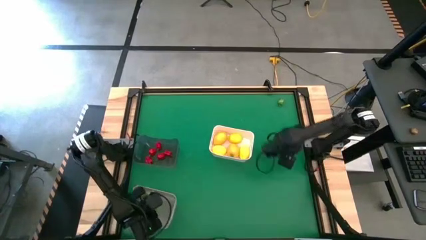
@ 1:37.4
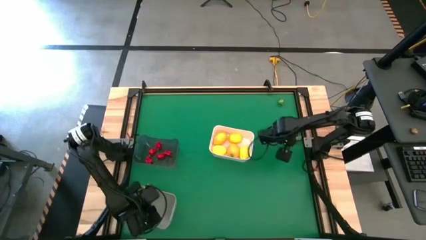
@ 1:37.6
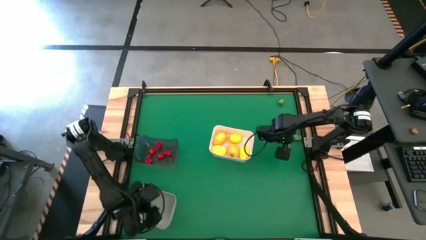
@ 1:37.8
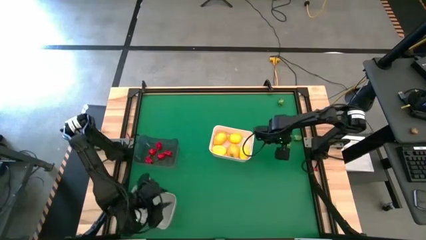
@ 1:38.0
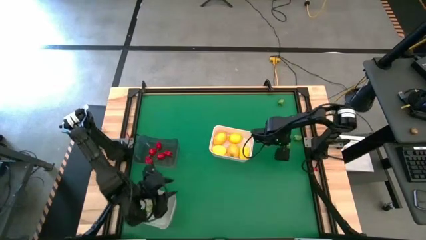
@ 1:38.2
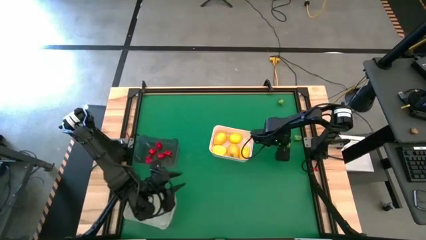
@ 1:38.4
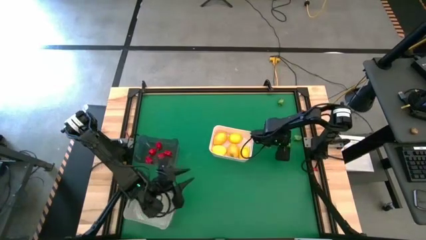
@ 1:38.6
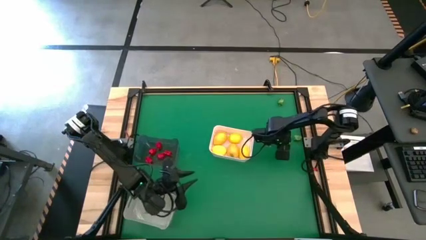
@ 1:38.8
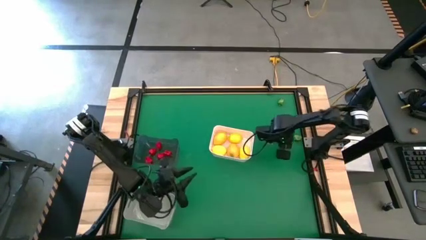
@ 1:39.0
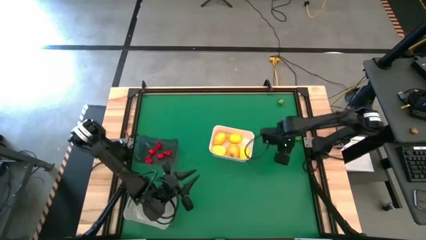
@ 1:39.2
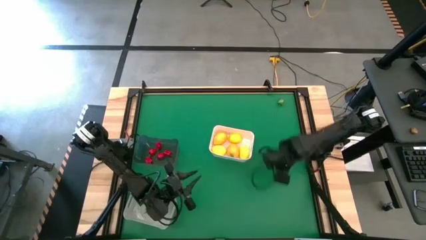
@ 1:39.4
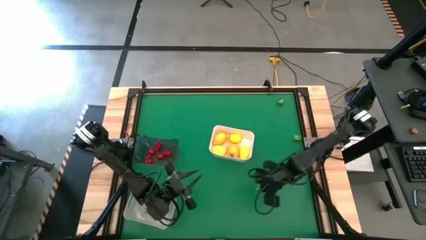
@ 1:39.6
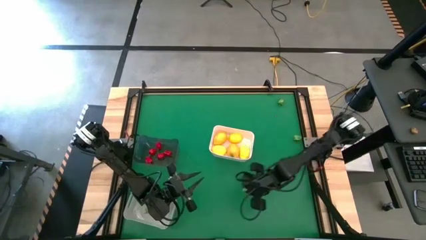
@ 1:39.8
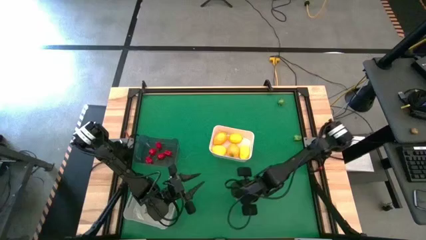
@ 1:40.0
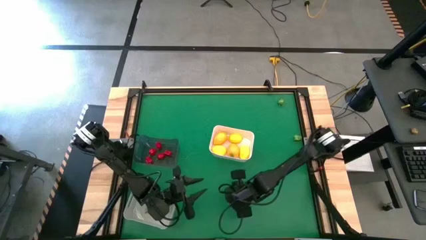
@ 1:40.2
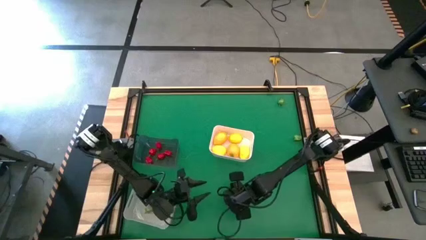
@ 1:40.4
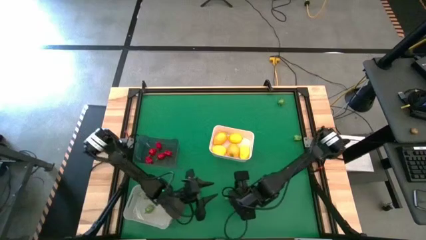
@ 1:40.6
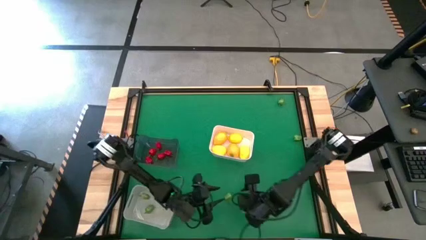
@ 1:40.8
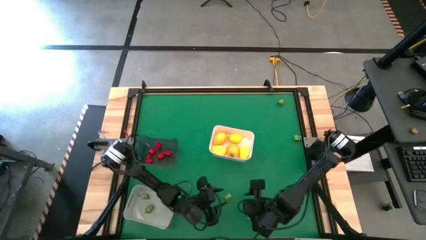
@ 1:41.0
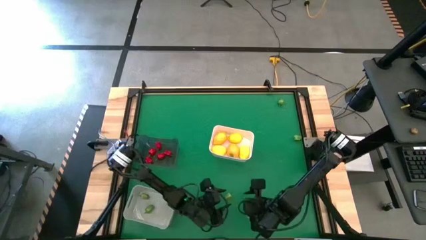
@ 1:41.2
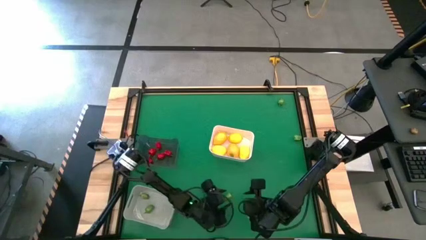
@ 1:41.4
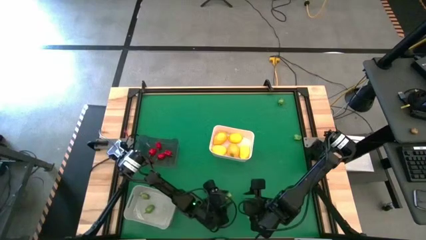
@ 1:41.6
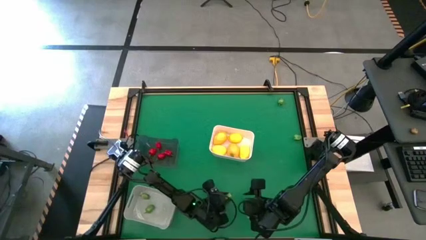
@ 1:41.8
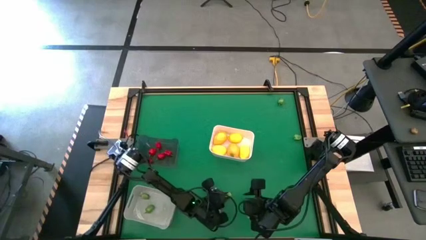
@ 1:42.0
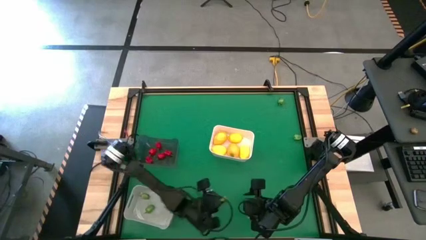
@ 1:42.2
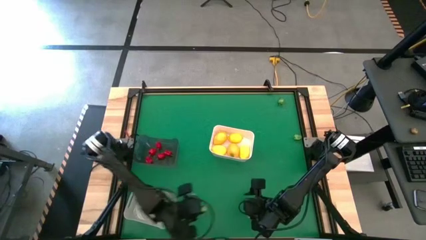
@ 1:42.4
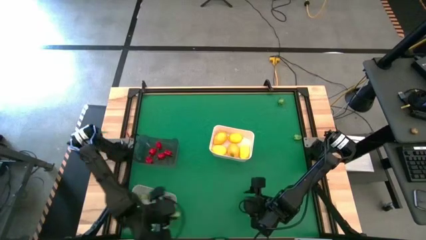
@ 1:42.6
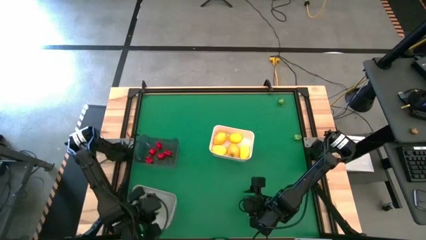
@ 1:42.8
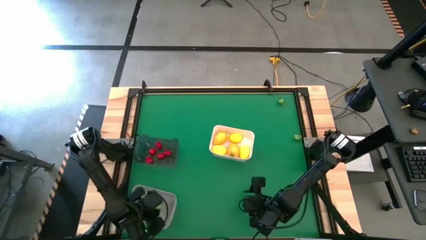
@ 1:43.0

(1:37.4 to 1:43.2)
Task: Sort produce into baskets
Put the green chili pepper into the gray bin

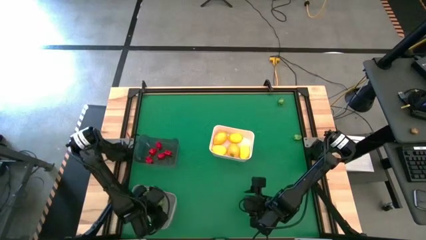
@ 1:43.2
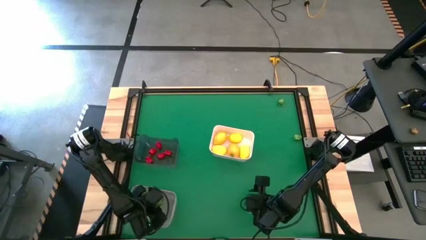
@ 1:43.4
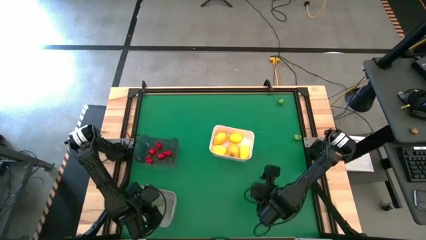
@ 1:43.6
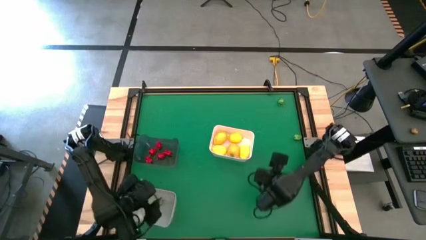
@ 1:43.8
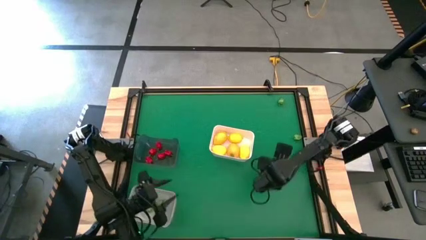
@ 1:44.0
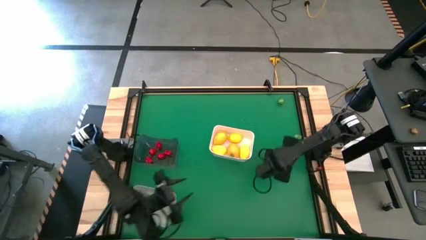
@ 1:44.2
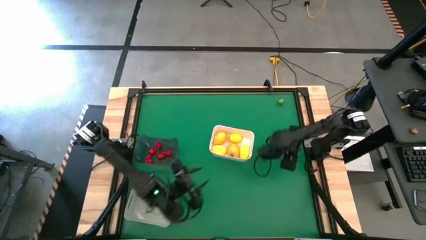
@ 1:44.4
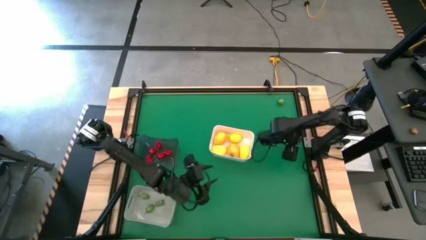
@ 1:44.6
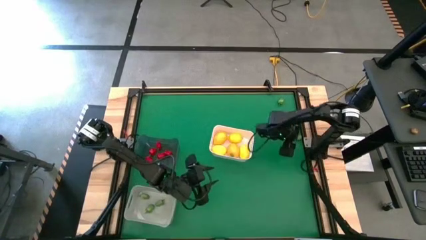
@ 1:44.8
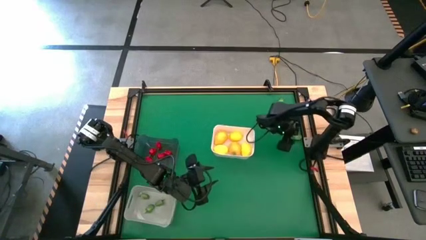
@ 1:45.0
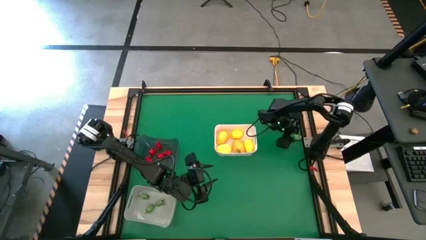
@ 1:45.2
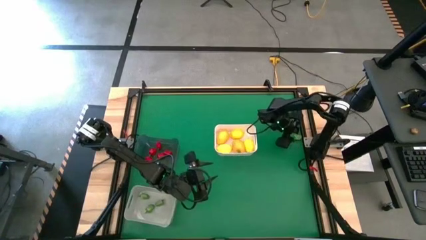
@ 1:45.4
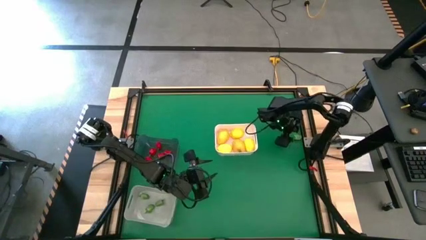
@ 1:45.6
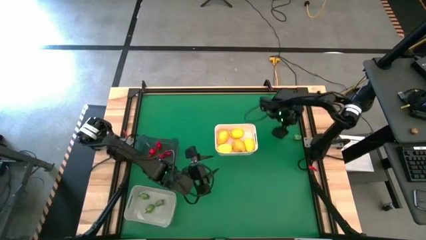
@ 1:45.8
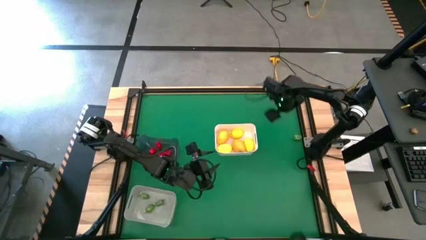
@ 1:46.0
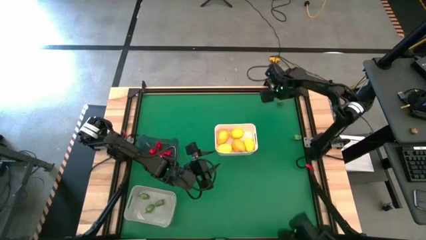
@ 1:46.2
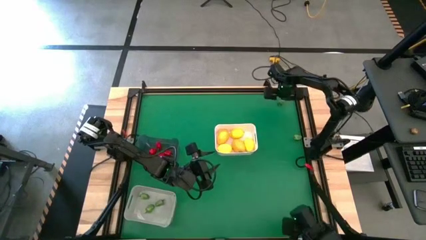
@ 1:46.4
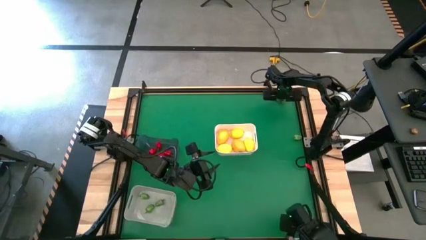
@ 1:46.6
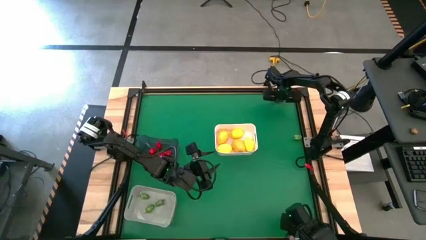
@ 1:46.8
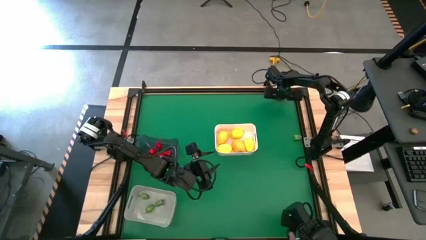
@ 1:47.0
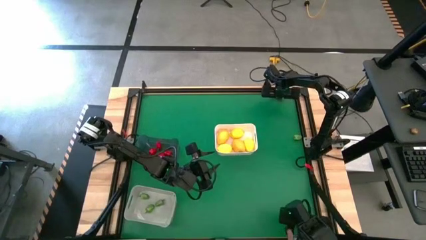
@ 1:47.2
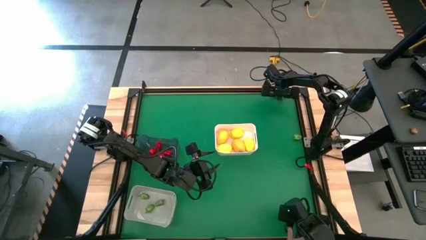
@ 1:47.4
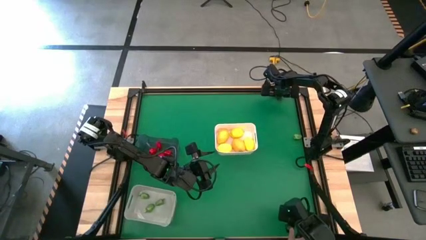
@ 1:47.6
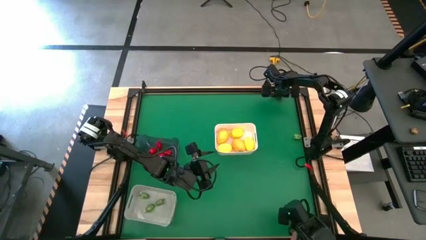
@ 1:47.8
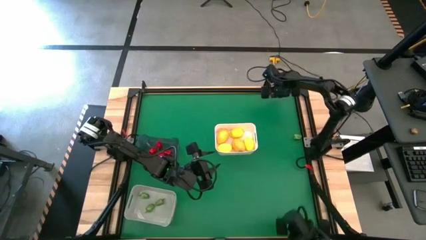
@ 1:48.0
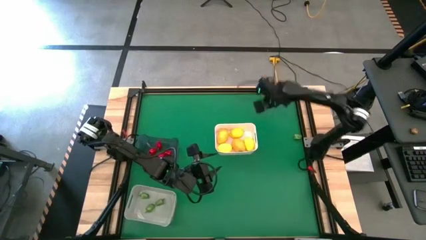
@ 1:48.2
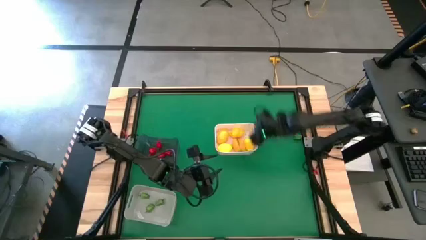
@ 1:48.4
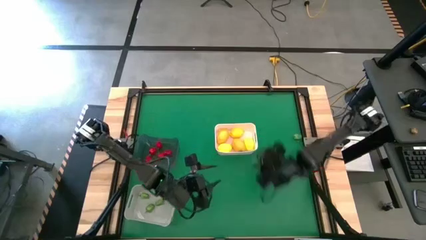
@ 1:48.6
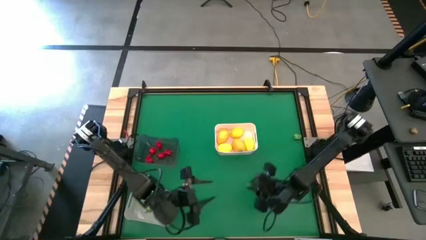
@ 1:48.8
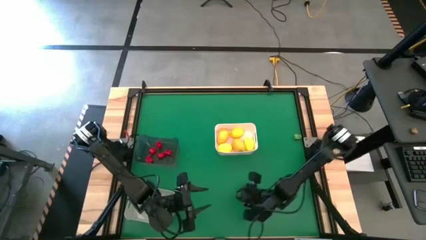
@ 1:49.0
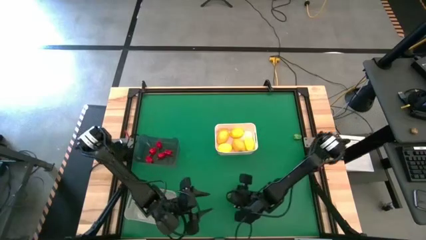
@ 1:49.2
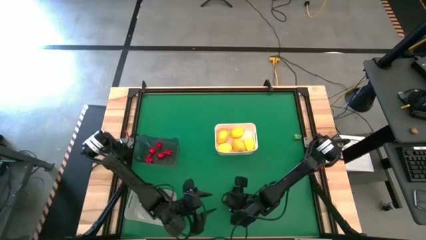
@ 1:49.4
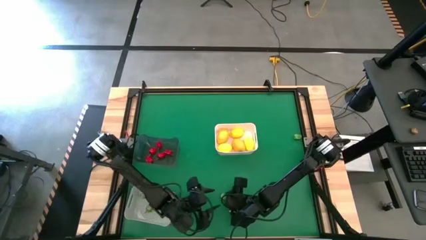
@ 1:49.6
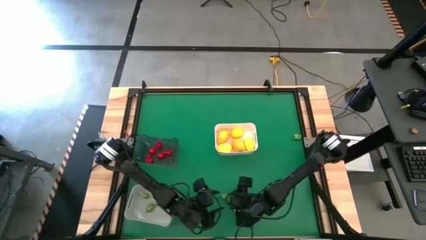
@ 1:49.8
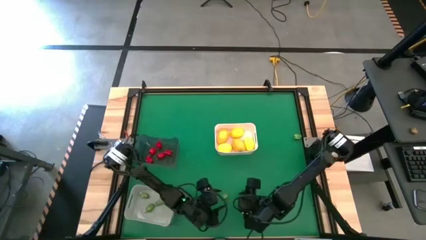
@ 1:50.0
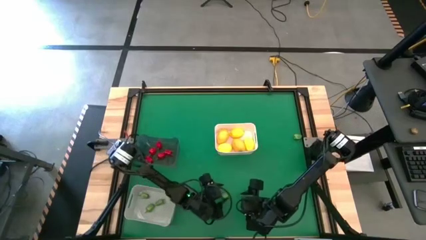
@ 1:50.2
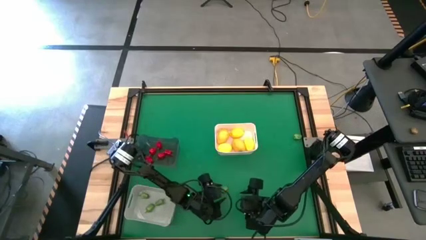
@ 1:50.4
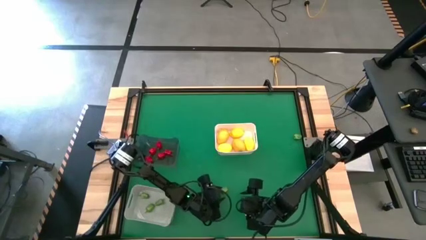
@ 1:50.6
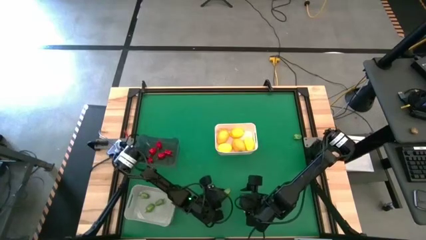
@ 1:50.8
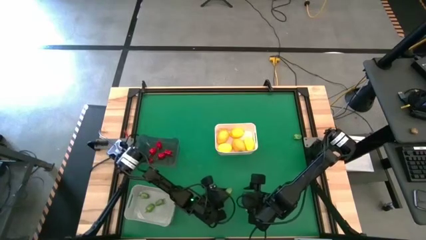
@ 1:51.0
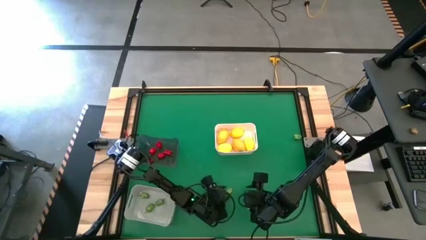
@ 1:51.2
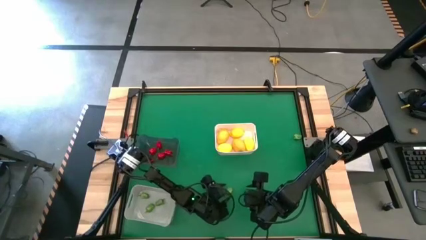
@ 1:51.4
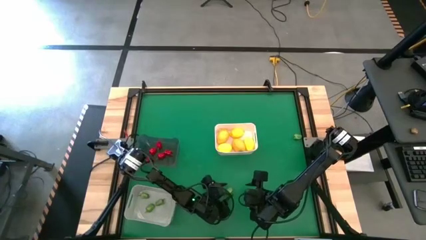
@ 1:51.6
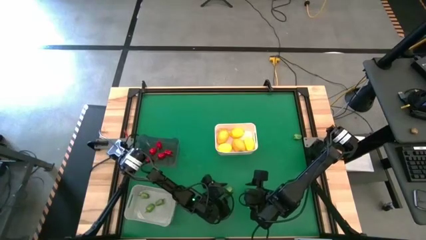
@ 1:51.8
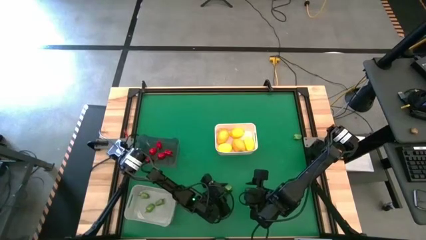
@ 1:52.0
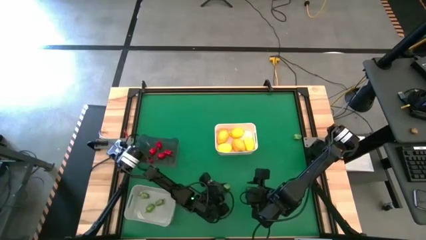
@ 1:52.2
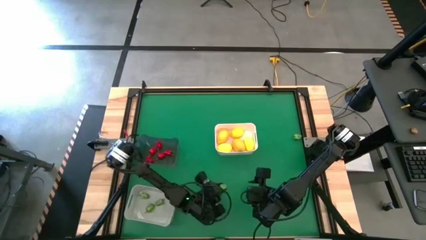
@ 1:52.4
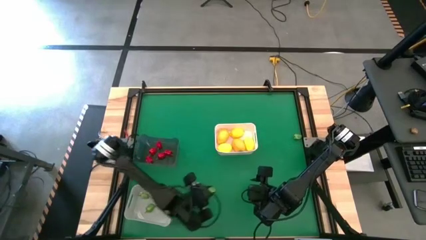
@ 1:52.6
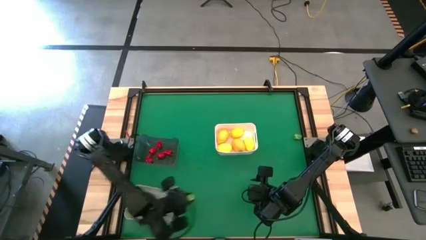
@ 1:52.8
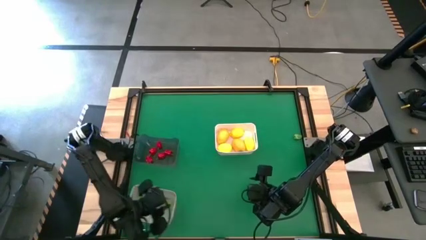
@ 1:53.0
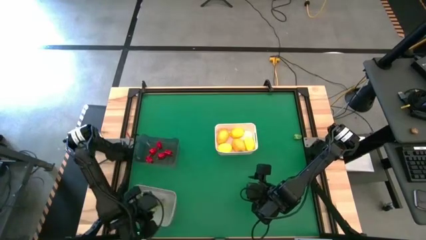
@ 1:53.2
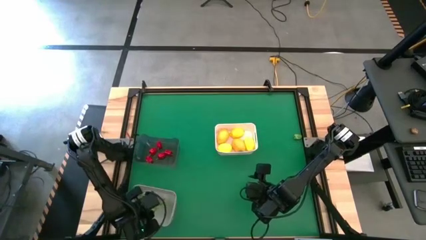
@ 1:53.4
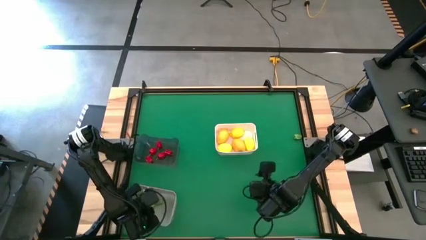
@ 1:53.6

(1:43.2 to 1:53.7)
Put the green chili pepper into the gray bin

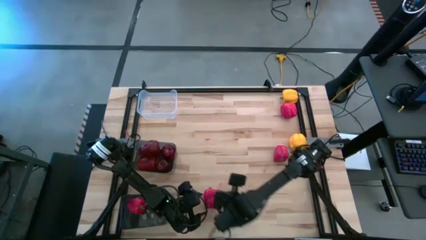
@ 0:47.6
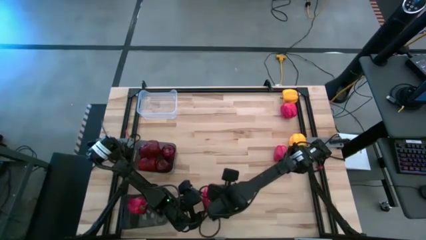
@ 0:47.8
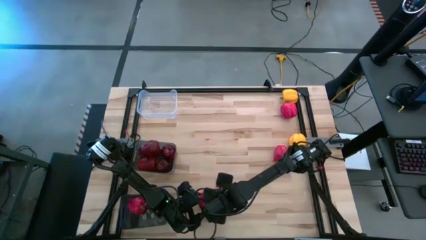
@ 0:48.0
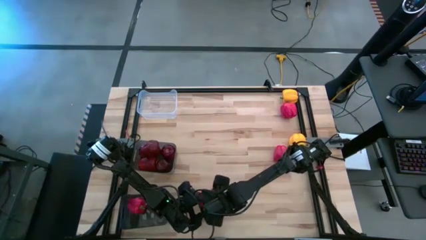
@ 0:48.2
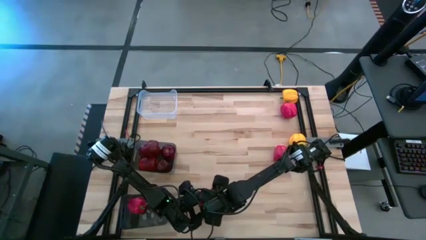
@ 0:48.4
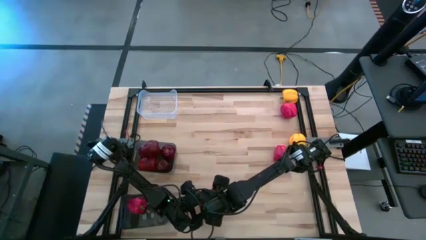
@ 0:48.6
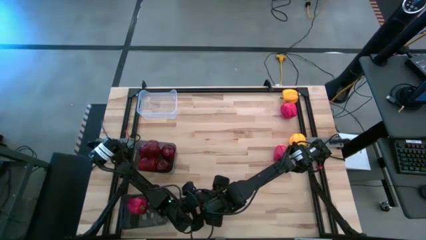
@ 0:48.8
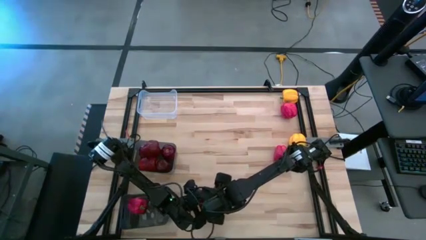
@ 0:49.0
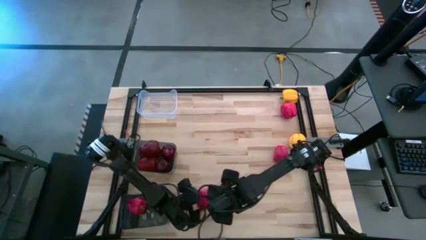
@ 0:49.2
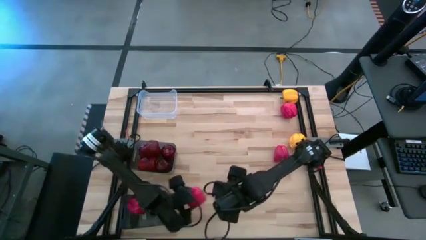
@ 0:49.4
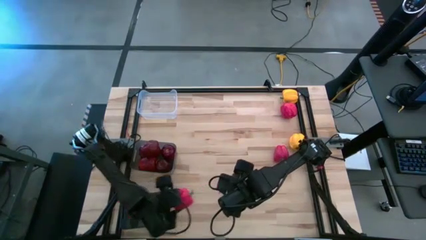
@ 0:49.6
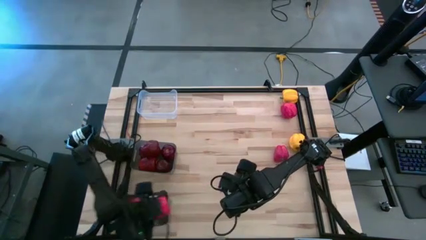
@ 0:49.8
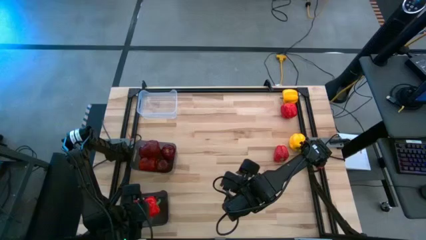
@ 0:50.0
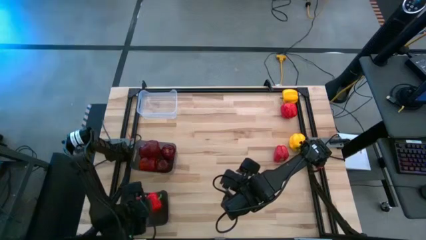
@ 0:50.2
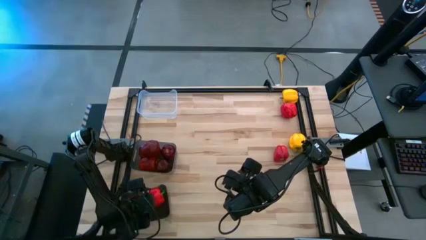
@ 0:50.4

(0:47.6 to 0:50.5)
Task: Sort produce into baskets
Put the red bell pepper into the bottom black bin
